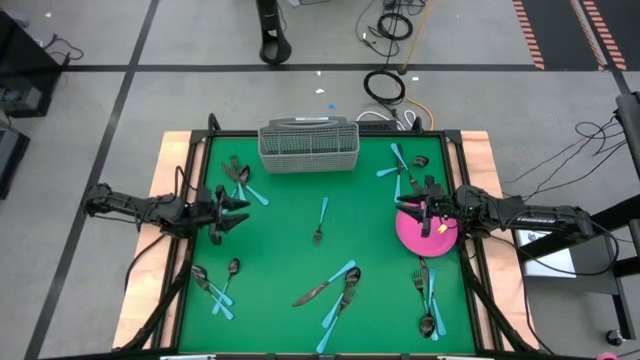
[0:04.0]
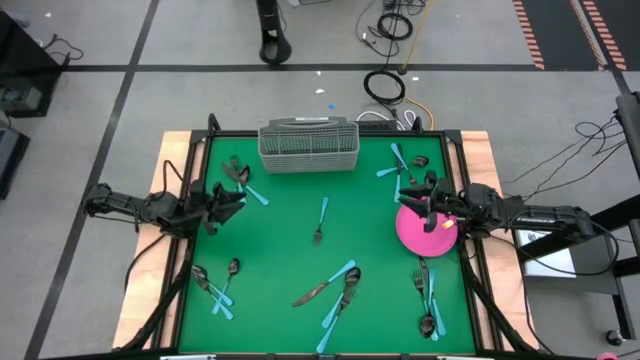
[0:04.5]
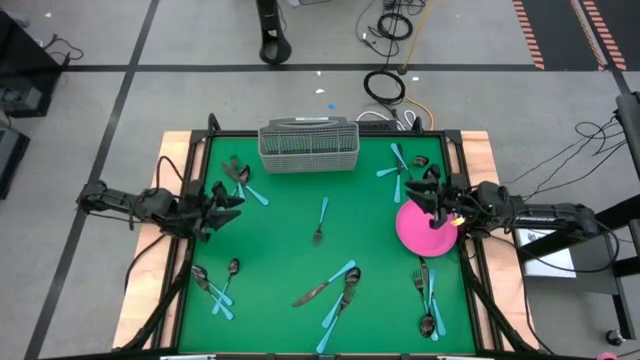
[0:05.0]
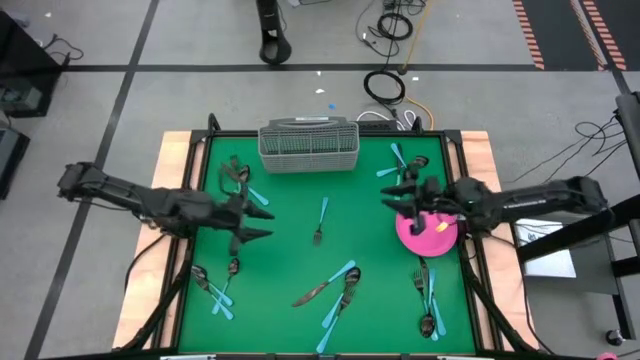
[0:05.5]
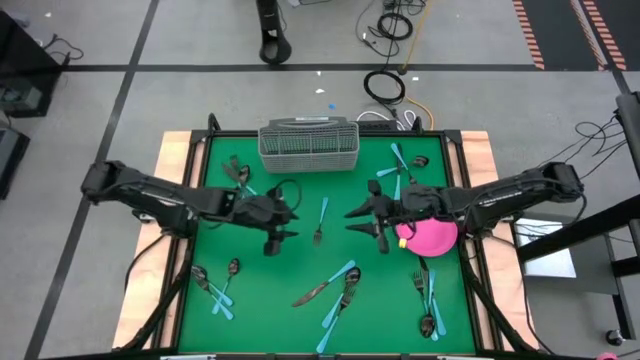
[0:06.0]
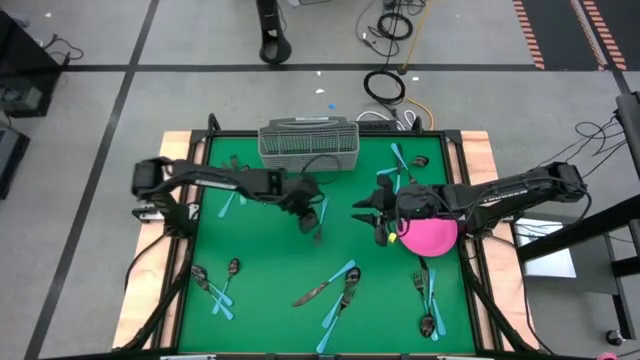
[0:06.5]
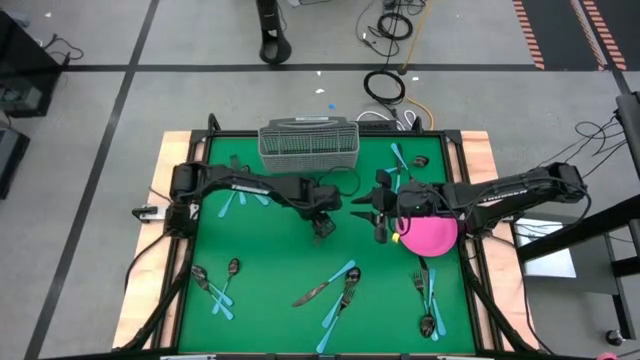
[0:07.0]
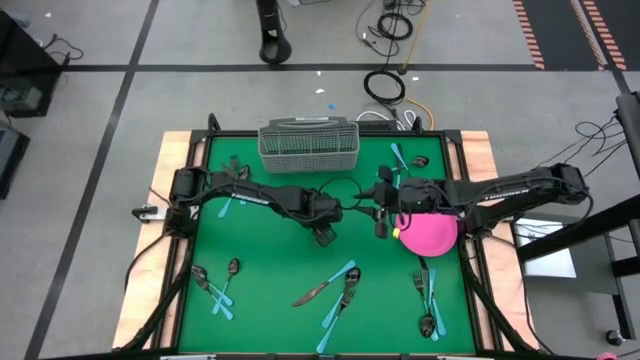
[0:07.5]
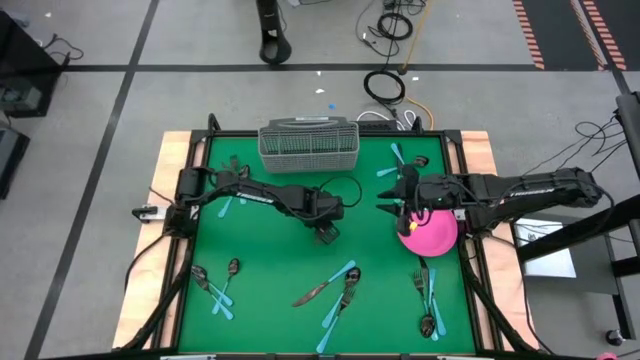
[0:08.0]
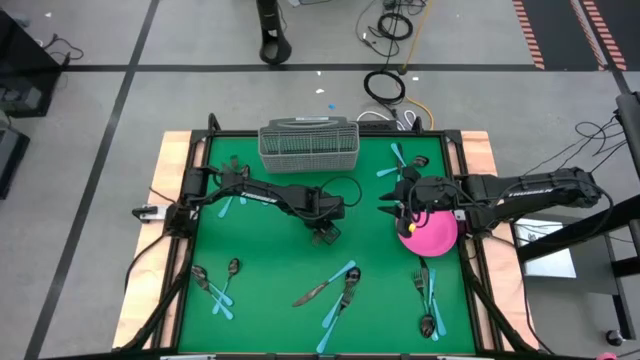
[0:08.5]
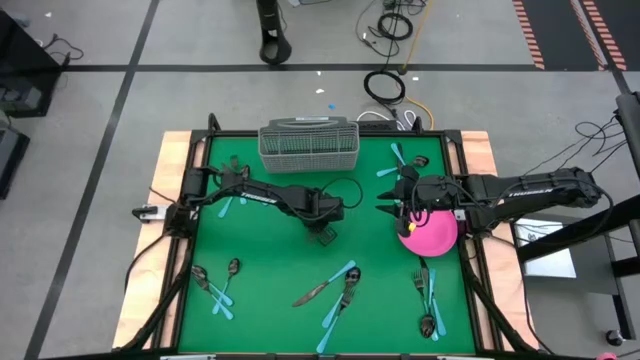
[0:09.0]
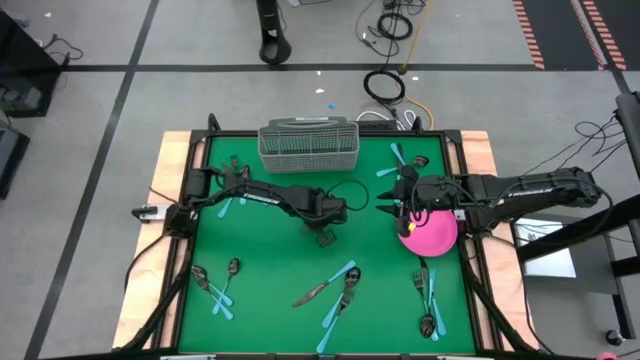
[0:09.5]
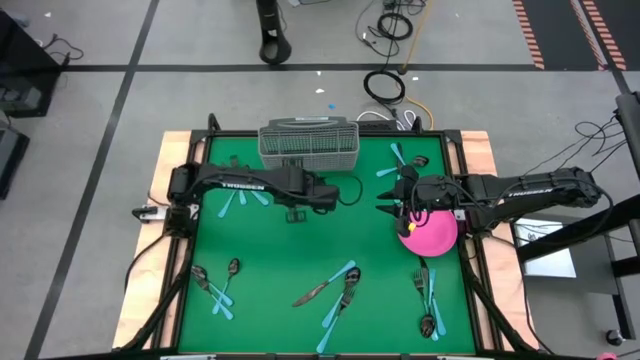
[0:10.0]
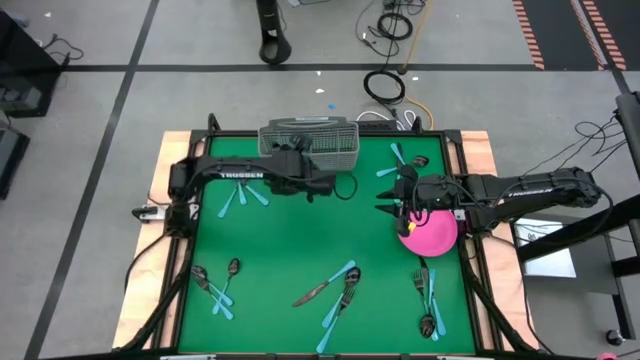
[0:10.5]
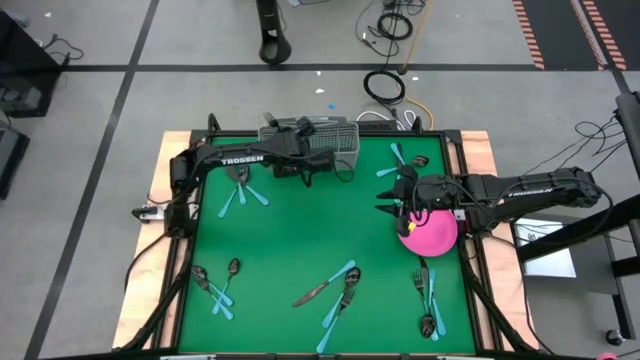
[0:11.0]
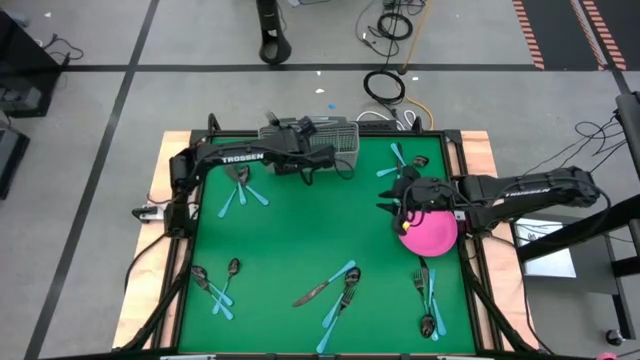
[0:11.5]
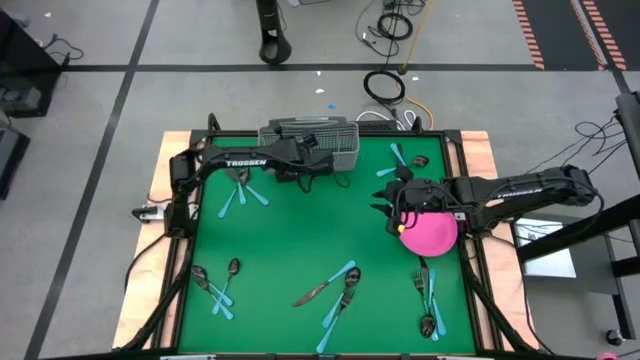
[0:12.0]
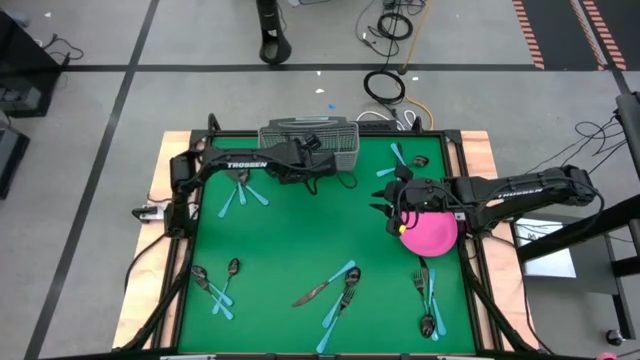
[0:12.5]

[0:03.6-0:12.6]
Task: Sort silverware
Put the blue fork into the silverware tray

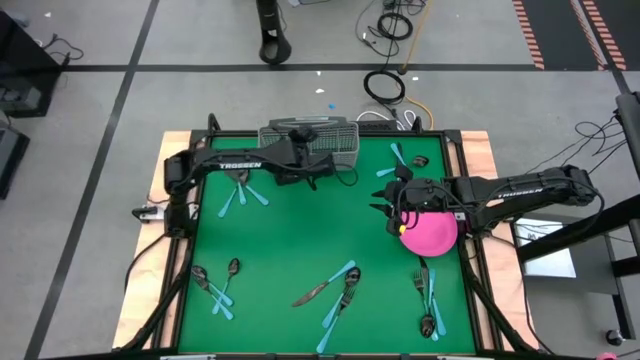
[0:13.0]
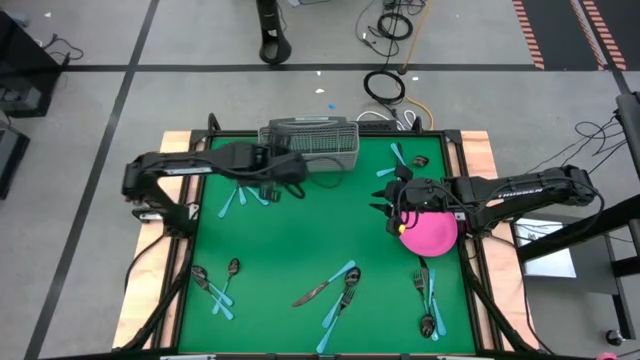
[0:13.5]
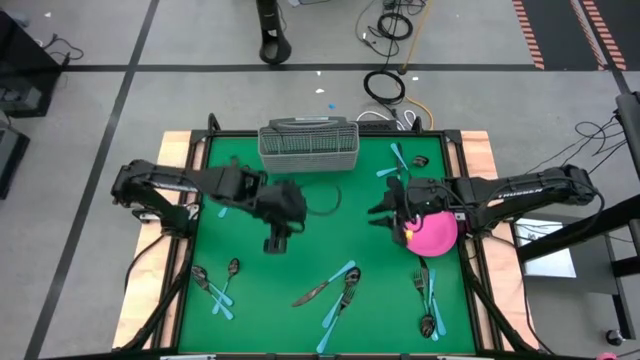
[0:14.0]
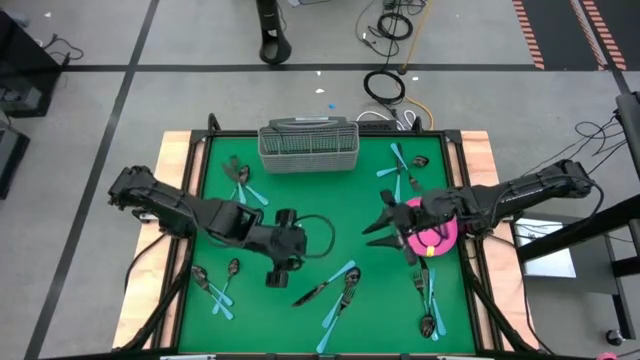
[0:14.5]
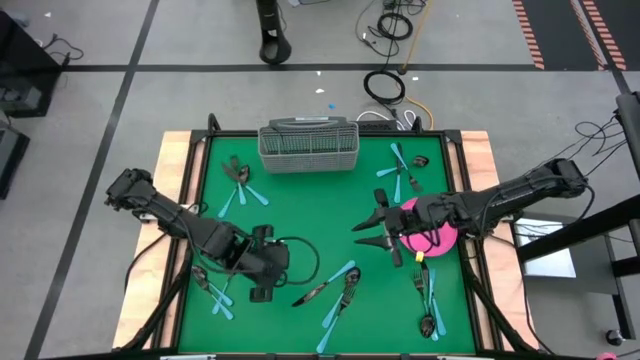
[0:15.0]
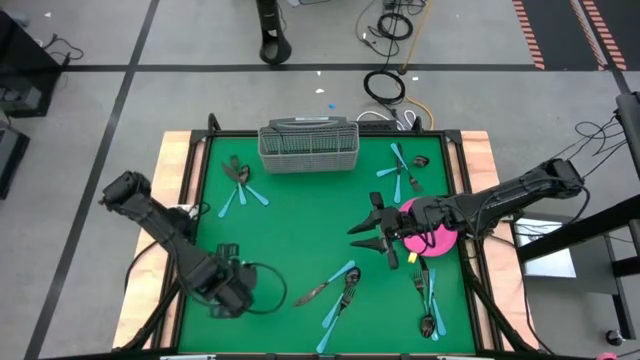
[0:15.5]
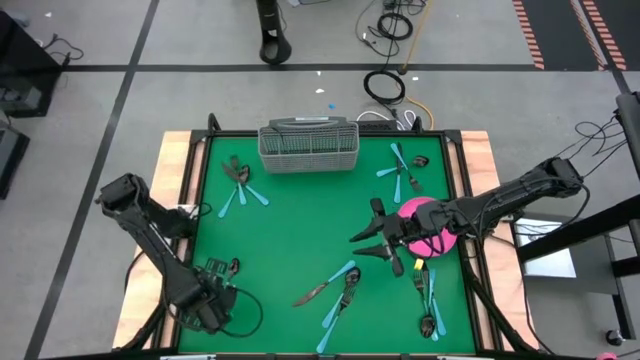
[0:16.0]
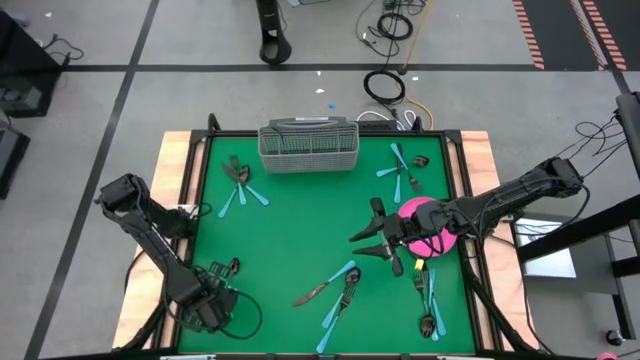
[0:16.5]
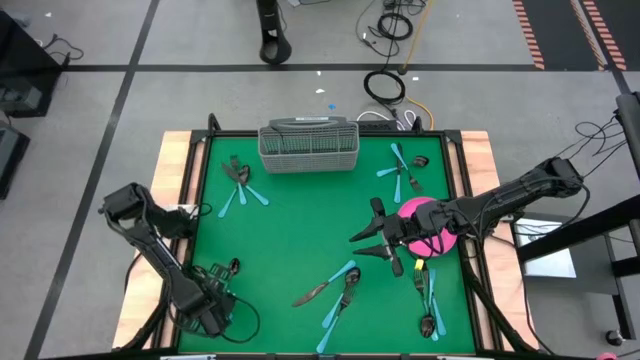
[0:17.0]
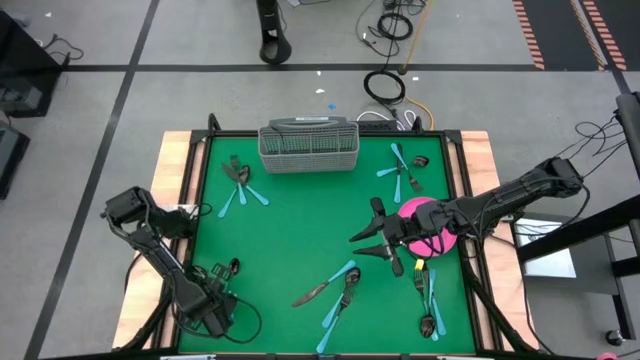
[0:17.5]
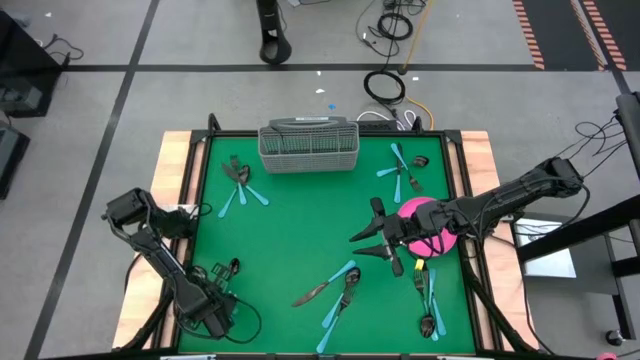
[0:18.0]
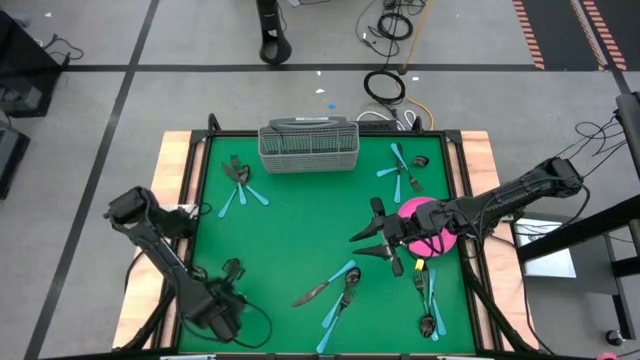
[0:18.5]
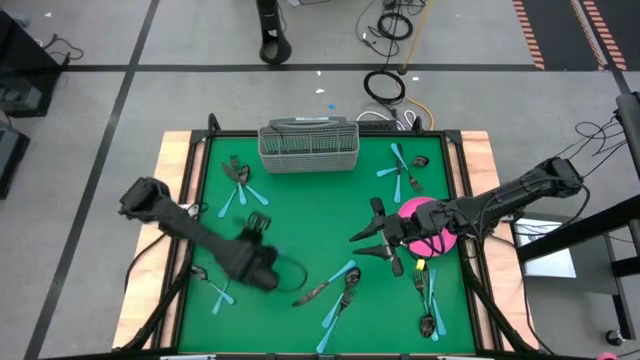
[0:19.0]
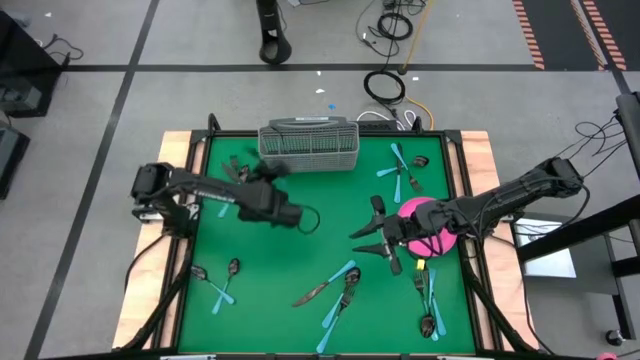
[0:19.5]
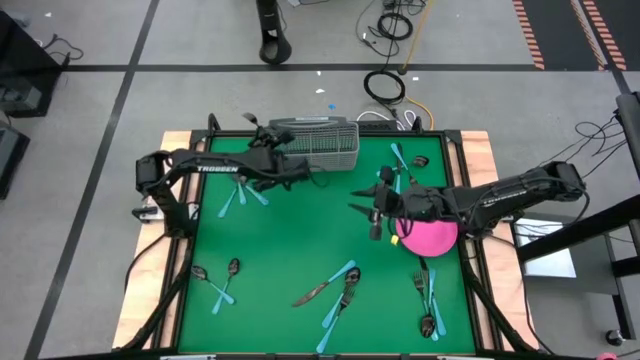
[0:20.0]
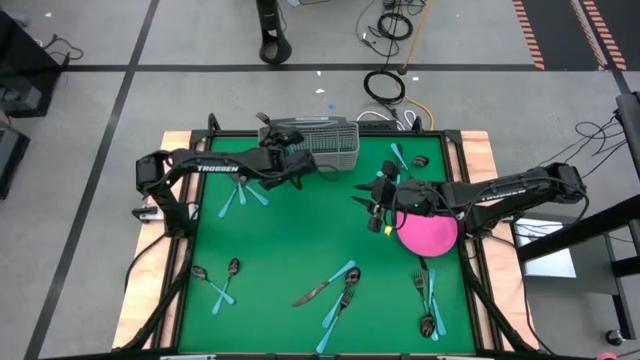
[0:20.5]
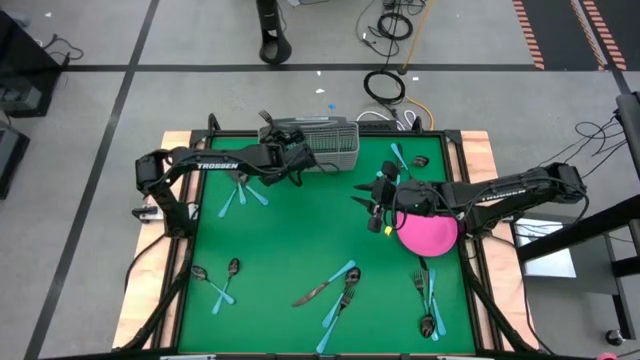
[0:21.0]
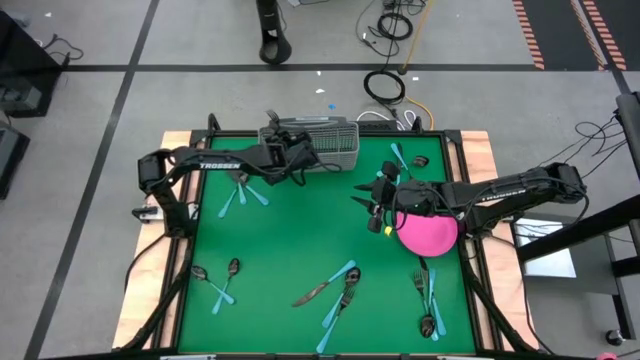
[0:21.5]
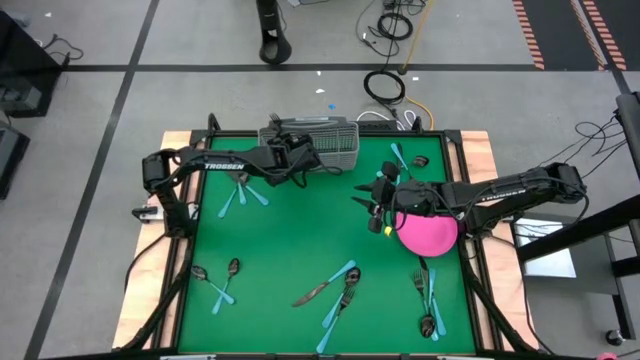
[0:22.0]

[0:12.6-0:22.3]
Put the blue fork into the silverware tray with the other blue fork

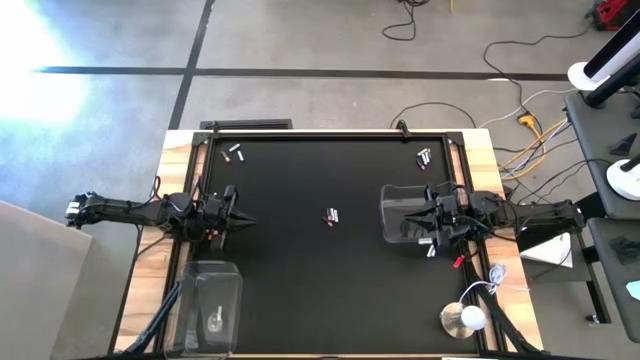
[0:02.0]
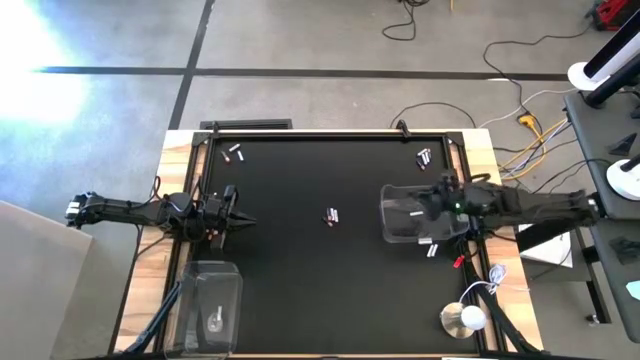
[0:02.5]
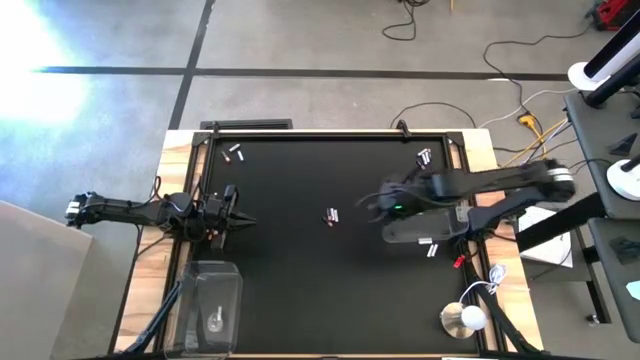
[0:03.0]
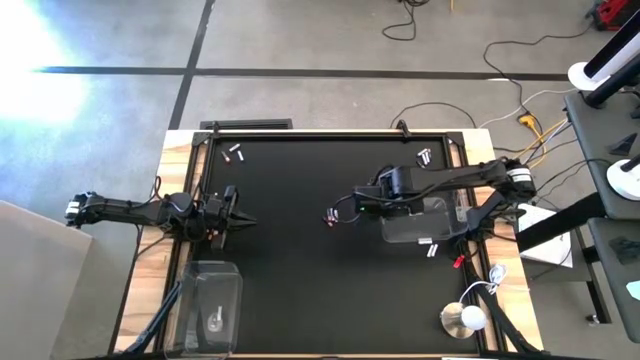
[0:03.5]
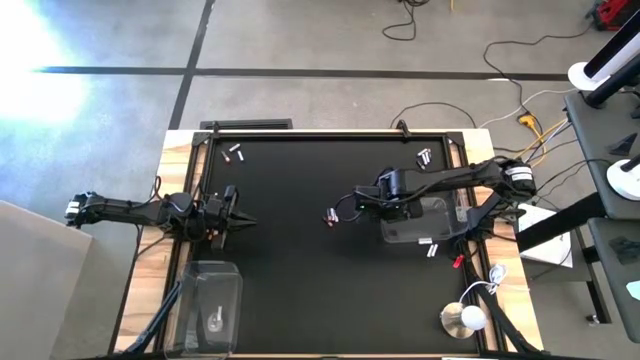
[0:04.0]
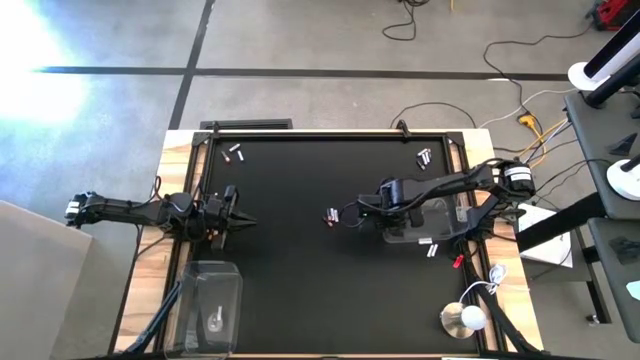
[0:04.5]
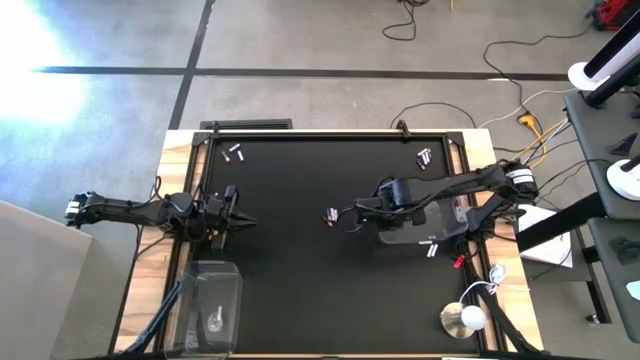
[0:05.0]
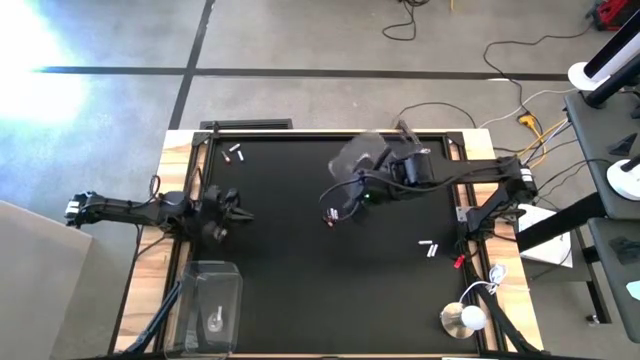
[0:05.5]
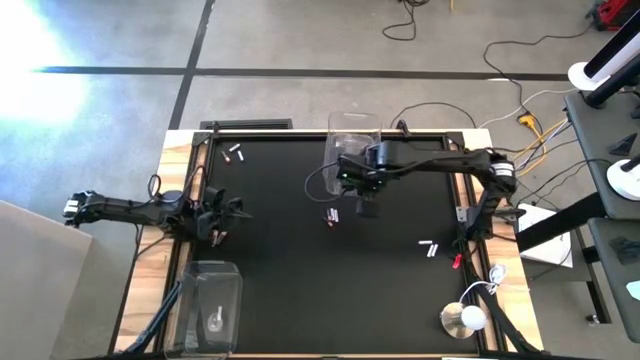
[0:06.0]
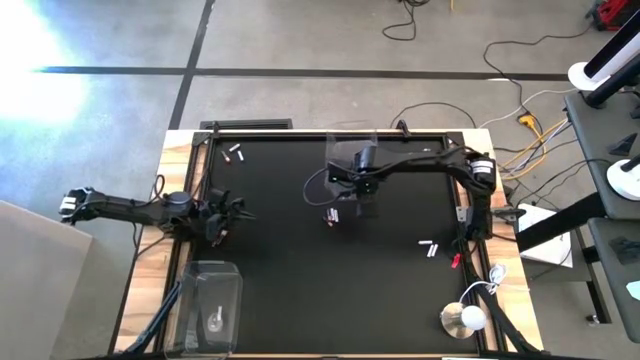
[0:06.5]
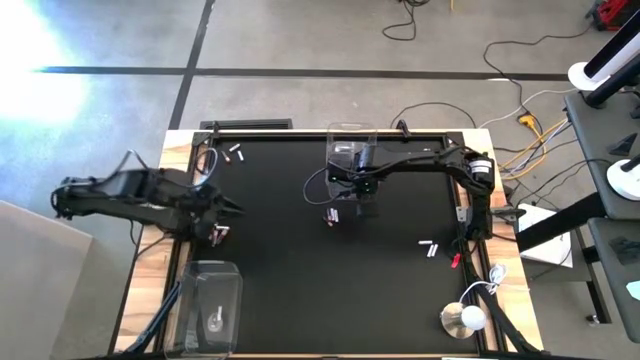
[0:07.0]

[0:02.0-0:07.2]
Task: Sort batteries
Move the right transparent bin to the top center of the table
